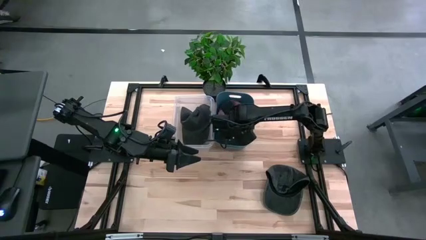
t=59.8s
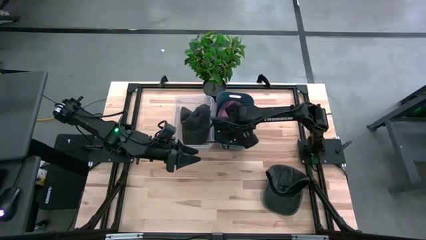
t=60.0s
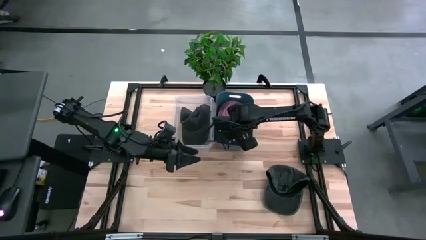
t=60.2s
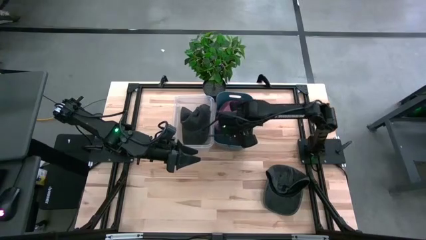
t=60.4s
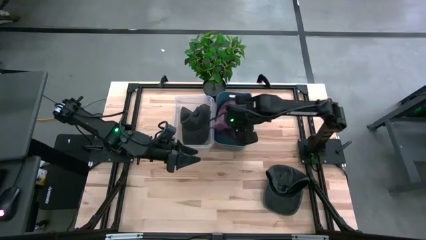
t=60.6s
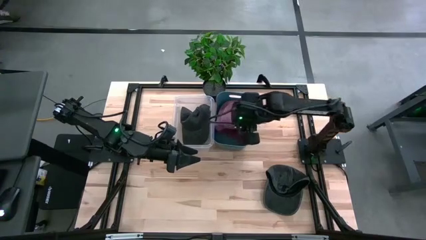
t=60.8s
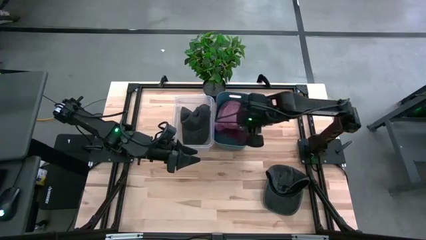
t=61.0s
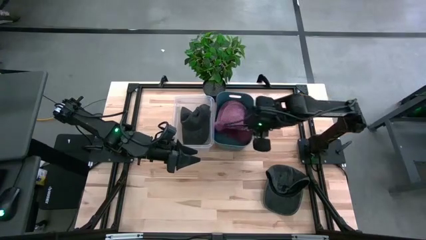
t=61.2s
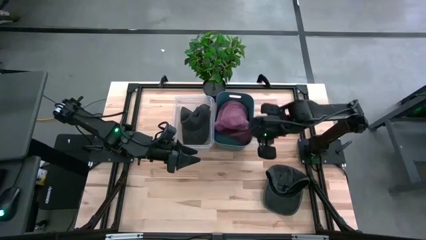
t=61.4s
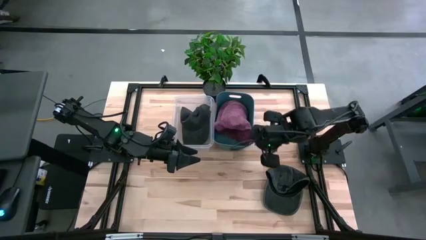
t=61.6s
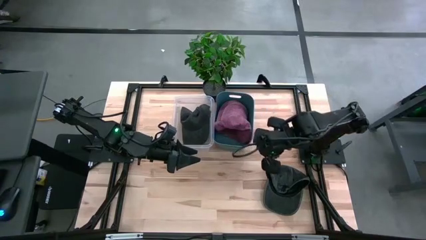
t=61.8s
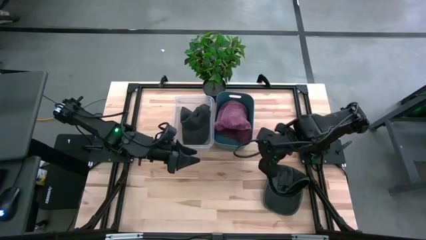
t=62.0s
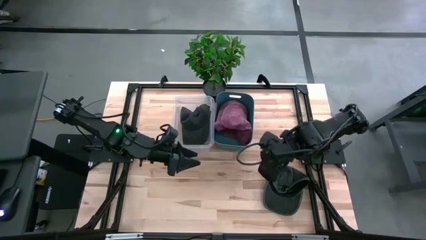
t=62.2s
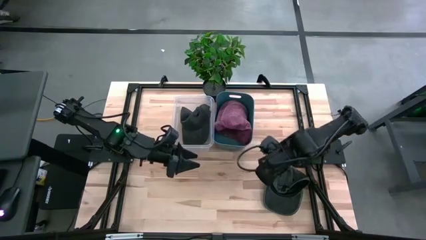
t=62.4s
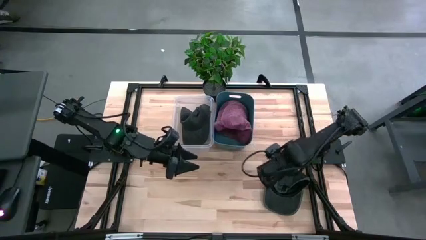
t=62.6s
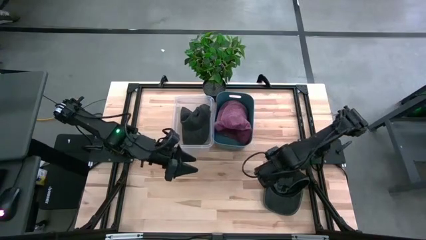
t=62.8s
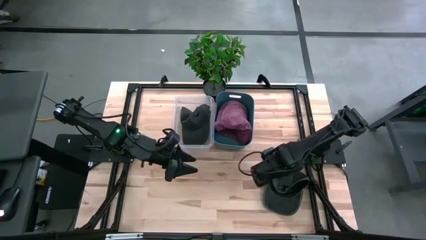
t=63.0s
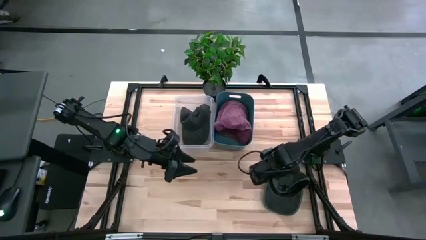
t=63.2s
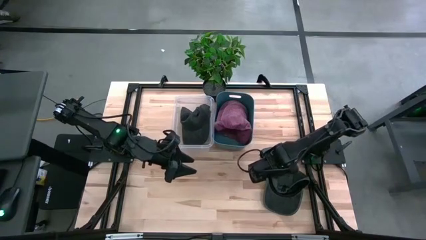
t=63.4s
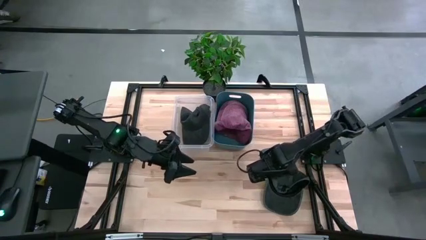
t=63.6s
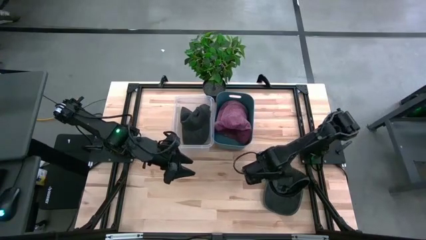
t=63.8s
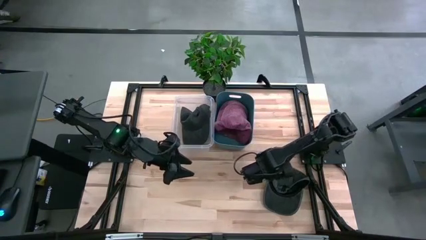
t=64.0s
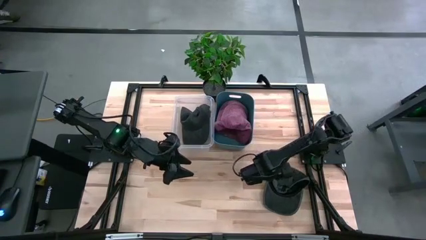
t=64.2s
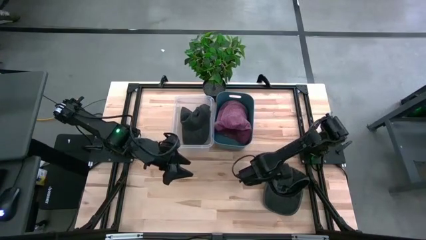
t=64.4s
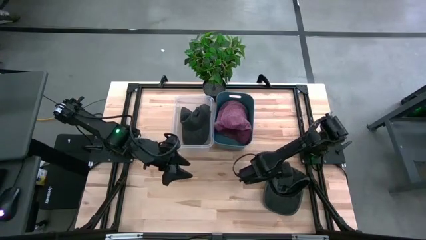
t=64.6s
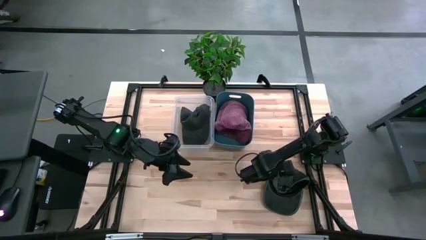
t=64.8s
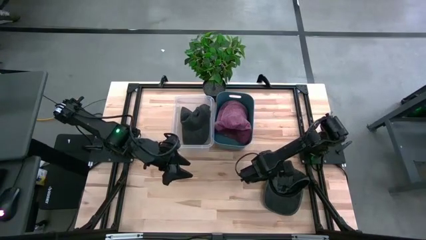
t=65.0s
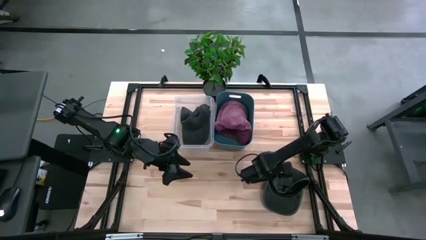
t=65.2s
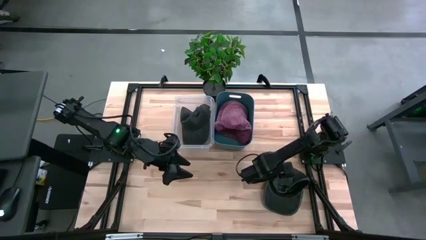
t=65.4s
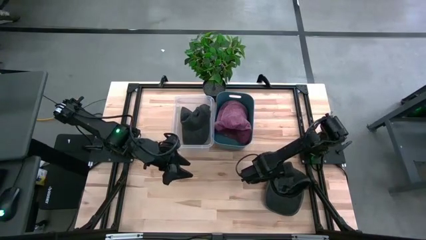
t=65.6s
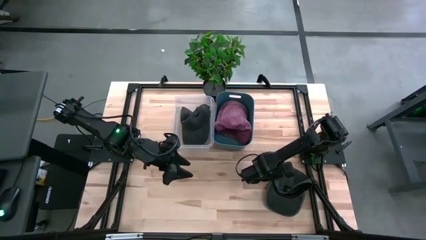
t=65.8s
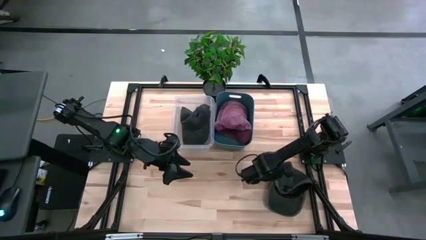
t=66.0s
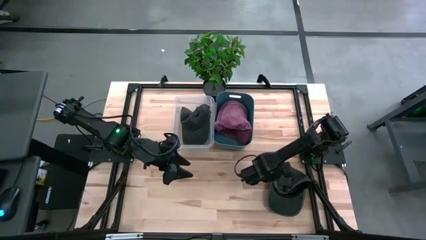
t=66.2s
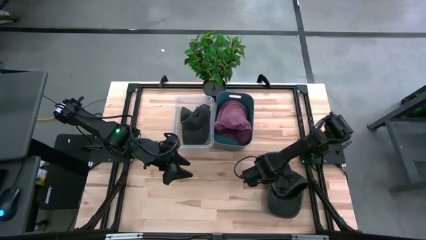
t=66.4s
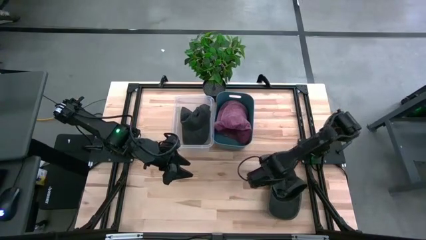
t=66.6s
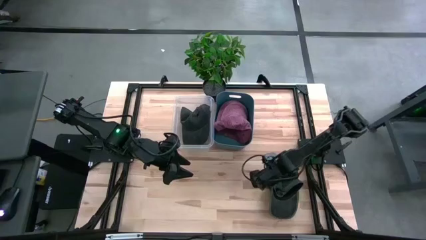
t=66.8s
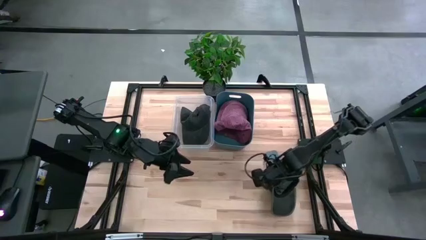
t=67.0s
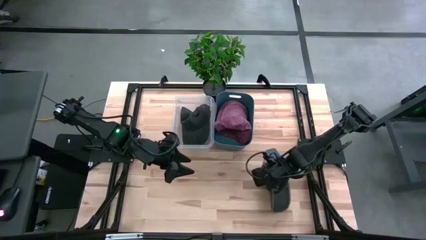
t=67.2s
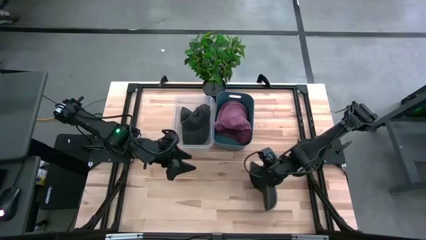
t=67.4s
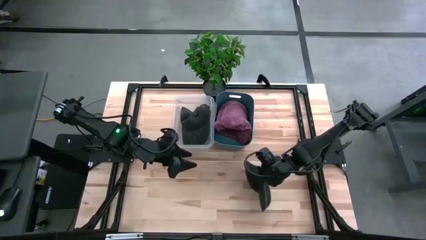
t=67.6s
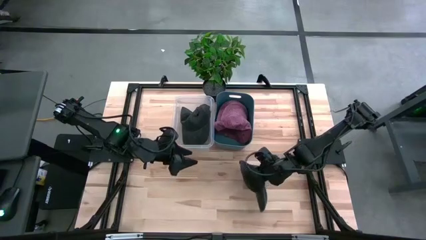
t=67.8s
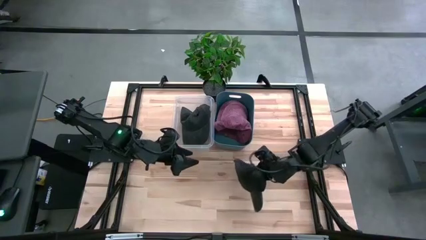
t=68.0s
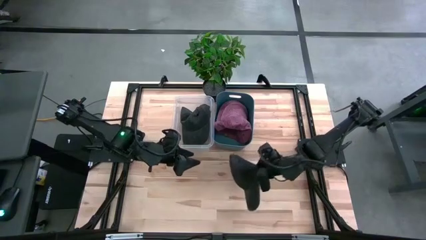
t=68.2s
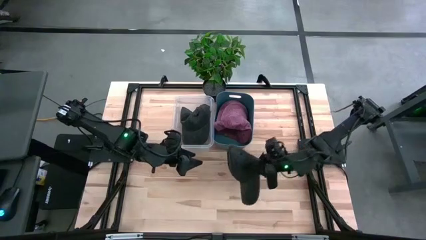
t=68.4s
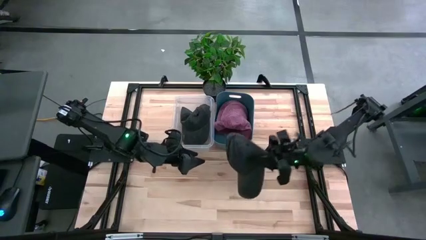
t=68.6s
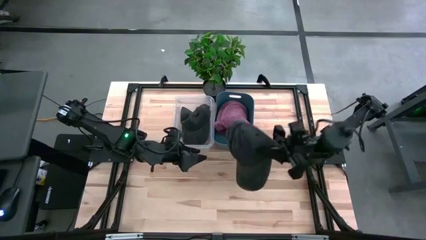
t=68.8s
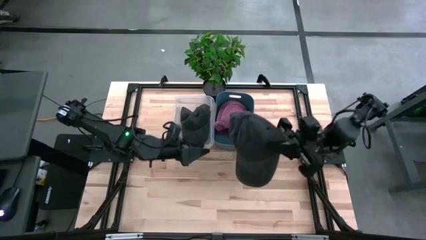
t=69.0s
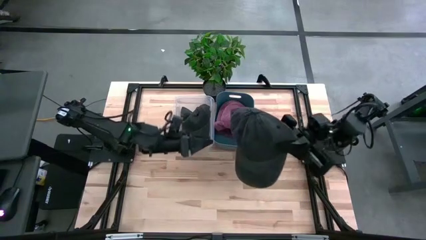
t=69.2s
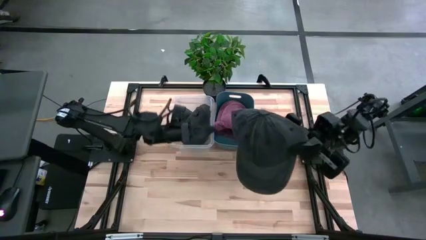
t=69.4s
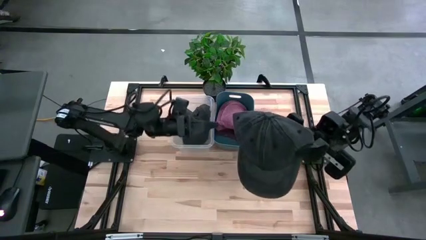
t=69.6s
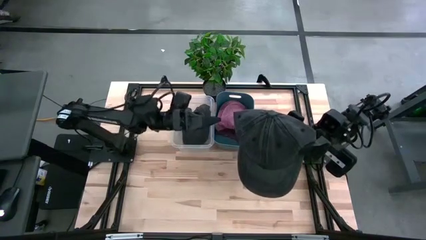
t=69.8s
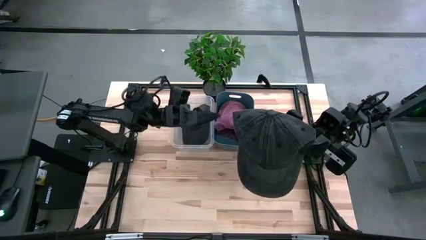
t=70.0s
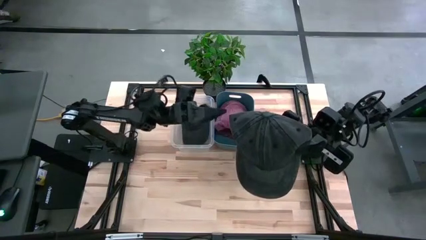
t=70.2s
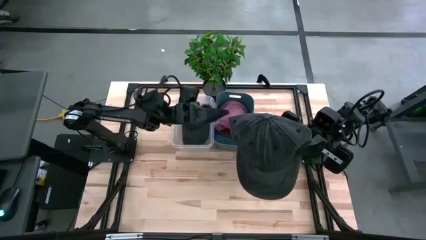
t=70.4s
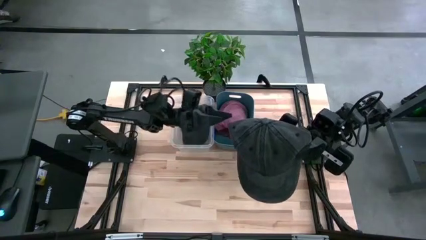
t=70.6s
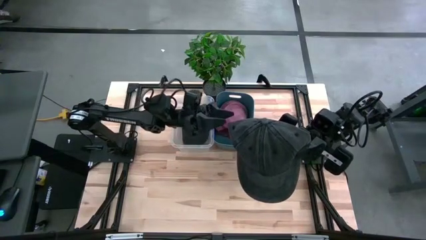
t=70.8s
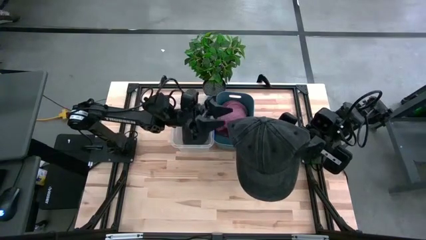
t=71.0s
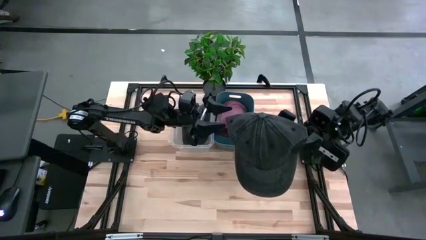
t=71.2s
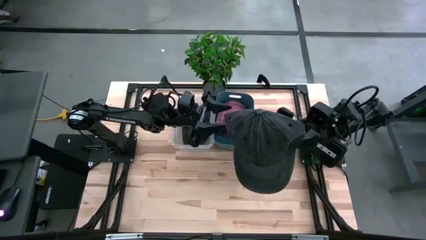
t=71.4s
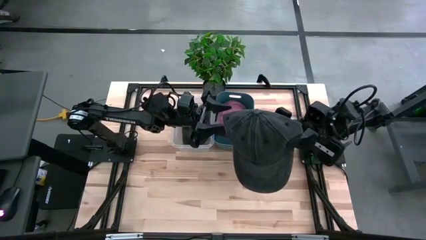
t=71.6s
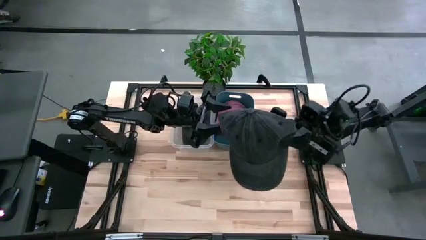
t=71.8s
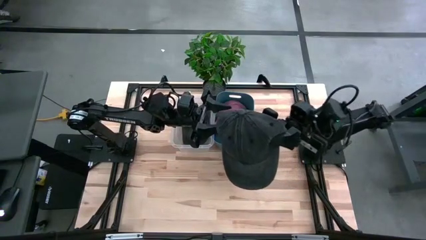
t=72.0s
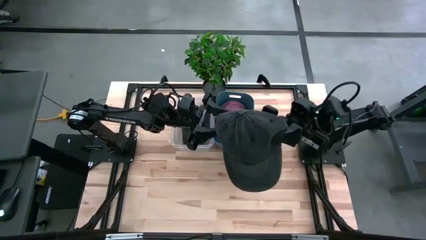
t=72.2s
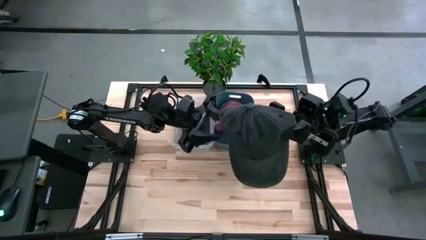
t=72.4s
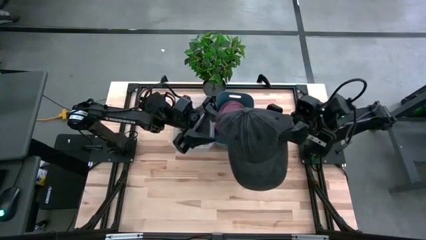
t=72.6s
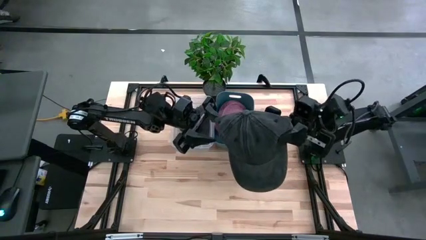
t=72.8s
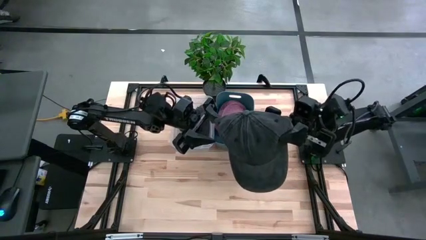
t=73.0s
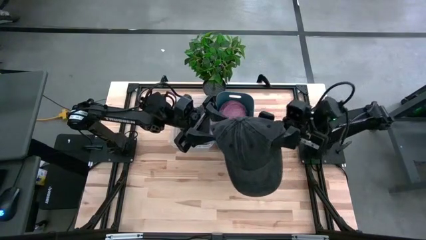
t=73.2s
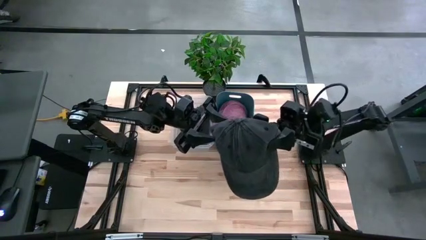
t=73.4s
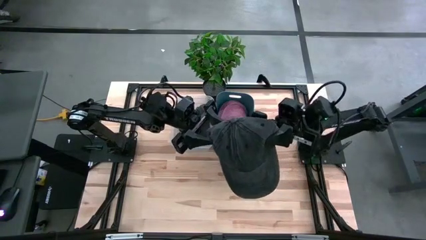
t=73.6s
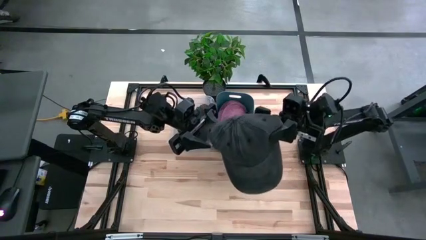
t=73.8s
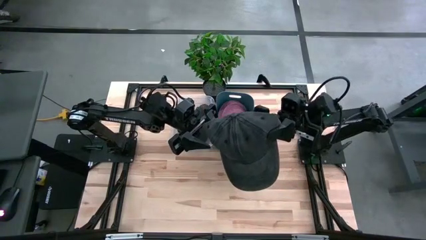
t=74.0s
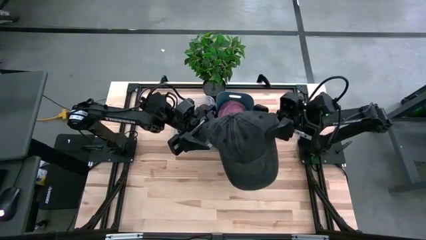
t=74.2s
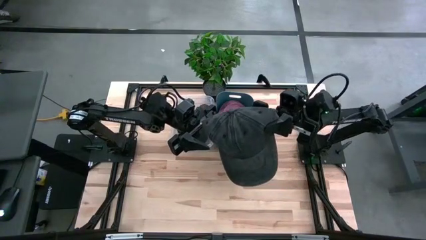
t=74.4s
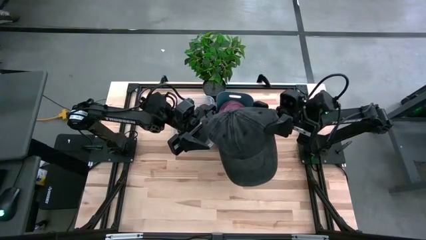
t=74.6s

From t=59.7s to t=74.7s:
Task: Pick & Place hat
Put the black cap into the blue bin

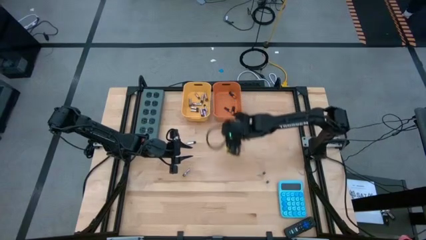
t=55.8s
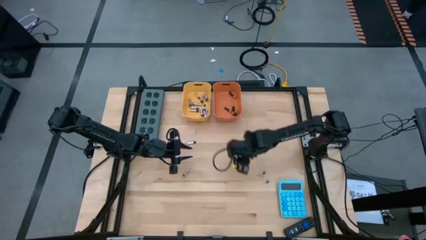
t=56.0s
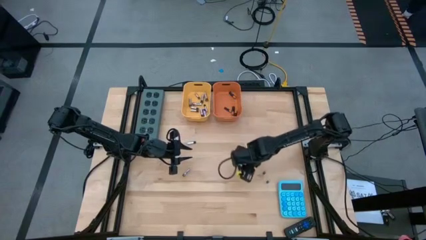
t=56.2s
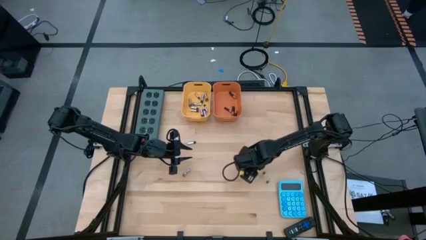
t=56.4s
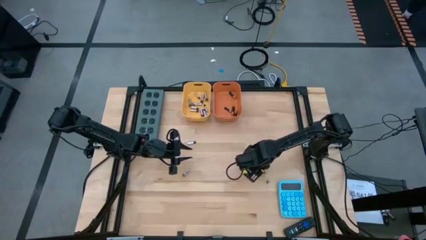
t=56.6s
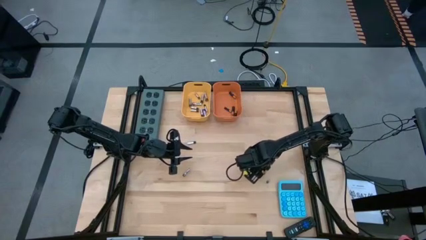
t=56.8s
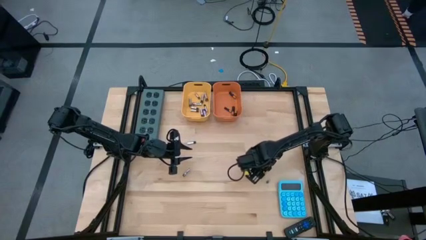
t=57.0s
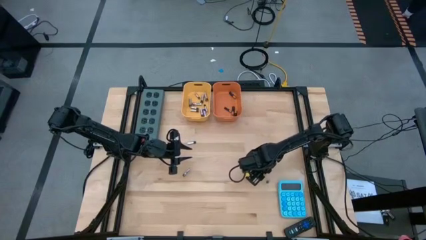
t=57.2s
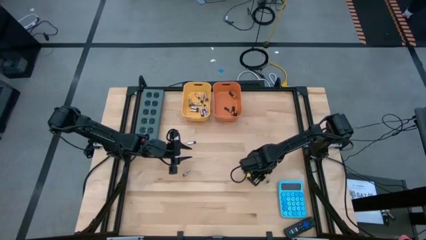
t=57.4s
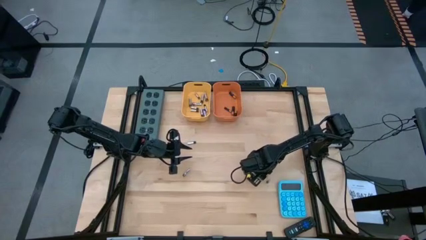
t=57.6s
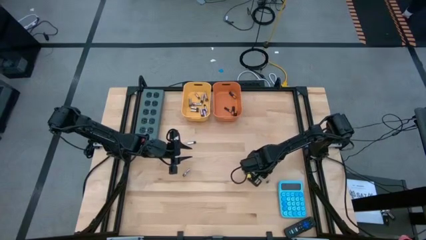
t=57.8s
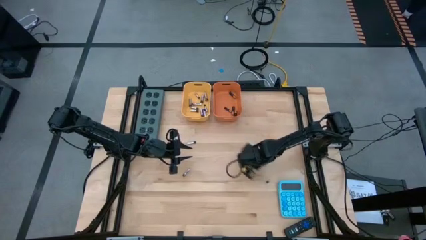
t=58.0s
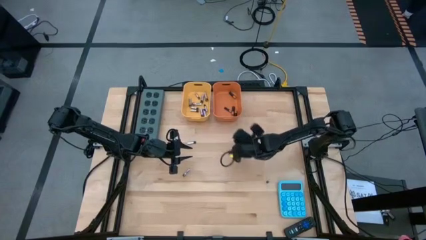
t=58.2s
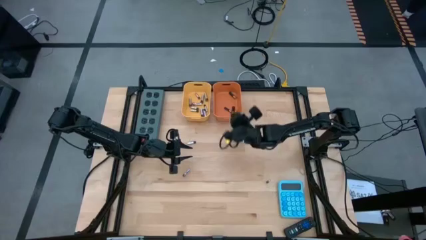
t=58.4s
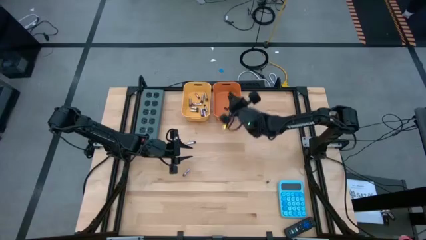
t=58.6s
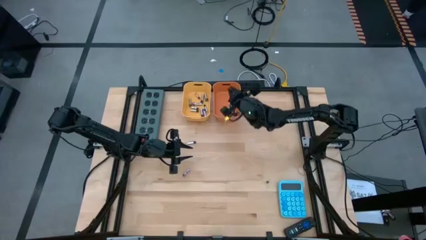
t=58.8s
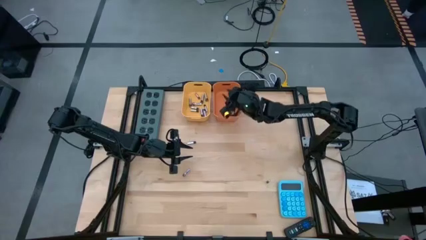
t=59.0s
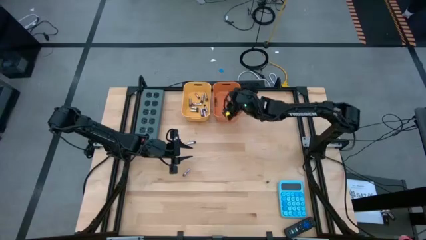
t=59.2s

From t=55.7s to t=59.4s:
Task: Sort batteries
Put the black battery into the orange bin
